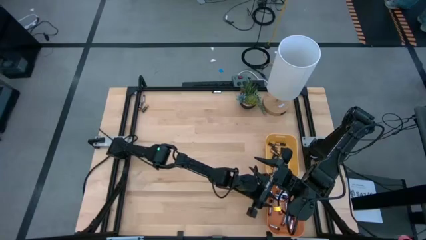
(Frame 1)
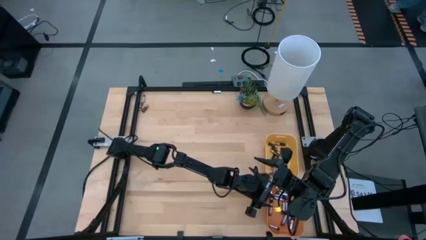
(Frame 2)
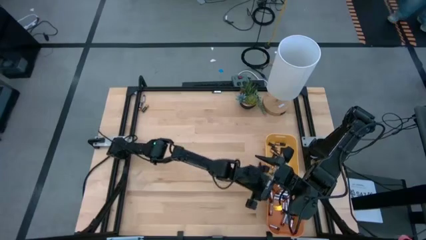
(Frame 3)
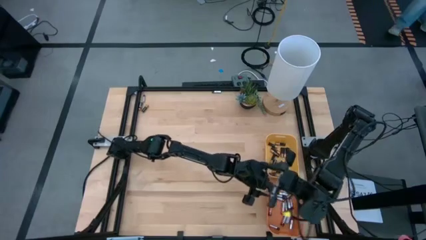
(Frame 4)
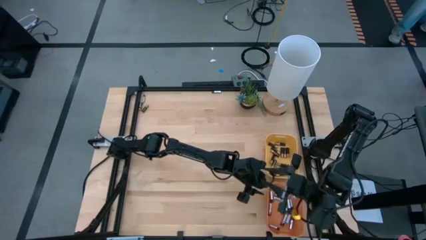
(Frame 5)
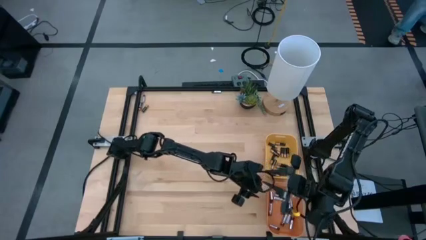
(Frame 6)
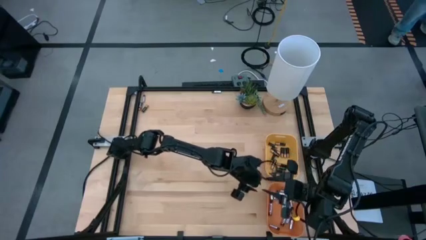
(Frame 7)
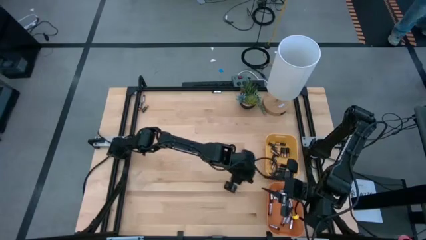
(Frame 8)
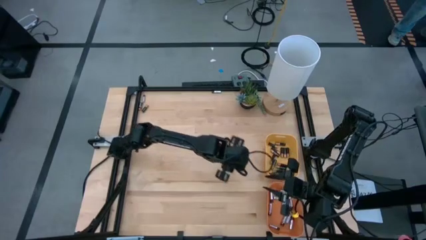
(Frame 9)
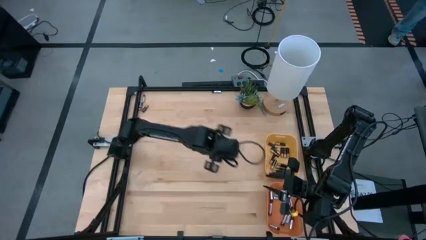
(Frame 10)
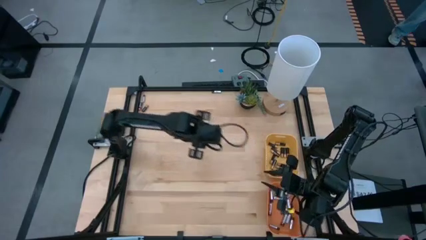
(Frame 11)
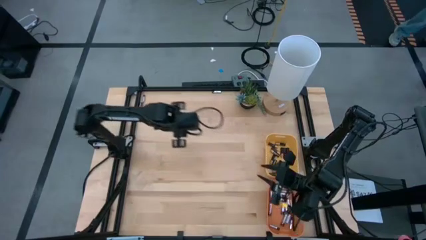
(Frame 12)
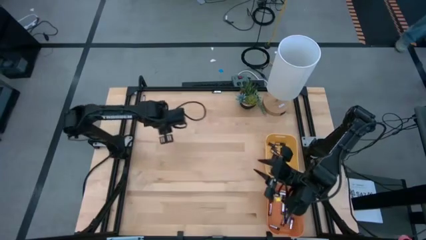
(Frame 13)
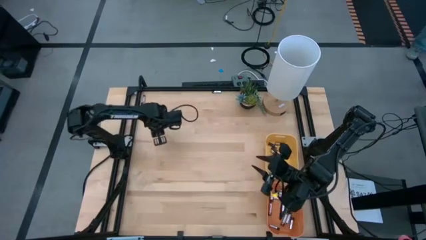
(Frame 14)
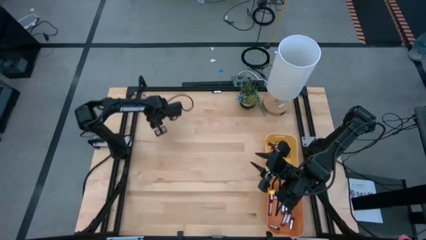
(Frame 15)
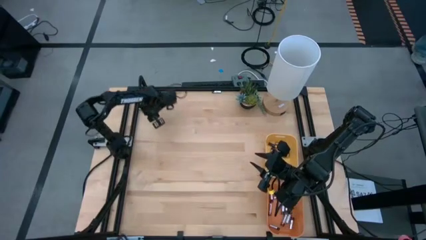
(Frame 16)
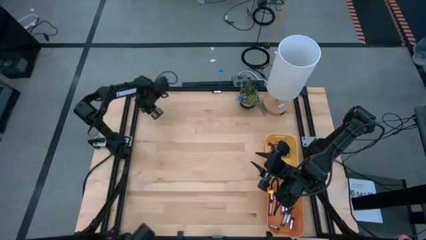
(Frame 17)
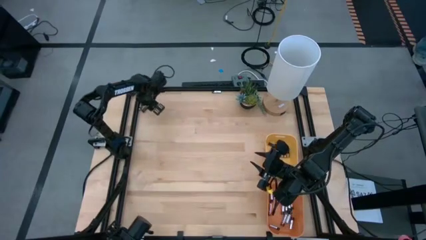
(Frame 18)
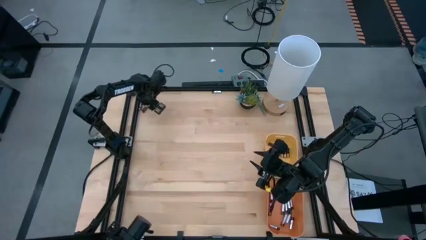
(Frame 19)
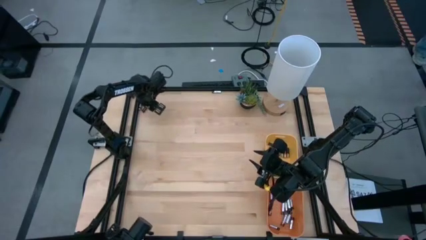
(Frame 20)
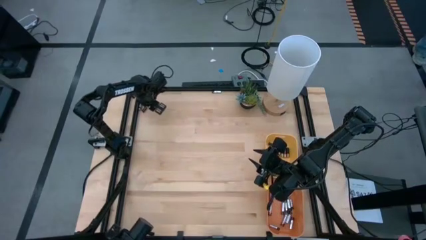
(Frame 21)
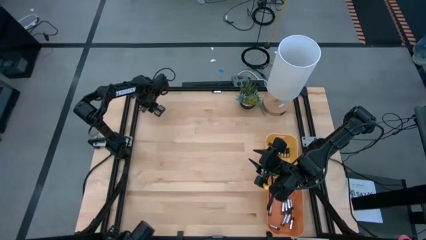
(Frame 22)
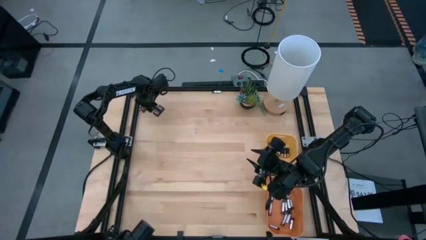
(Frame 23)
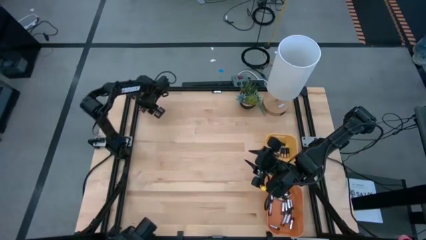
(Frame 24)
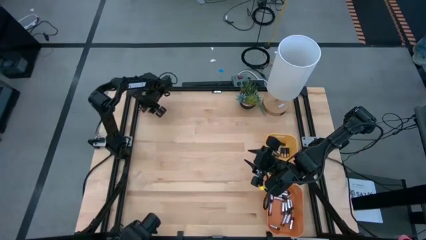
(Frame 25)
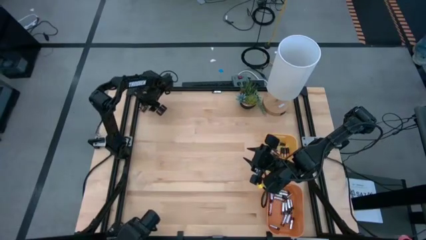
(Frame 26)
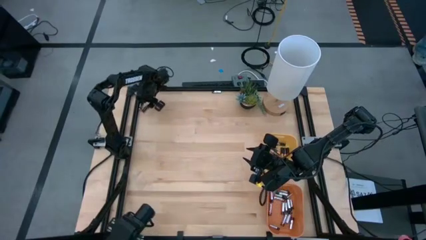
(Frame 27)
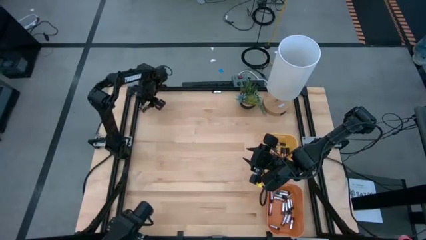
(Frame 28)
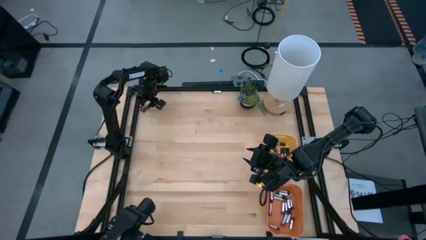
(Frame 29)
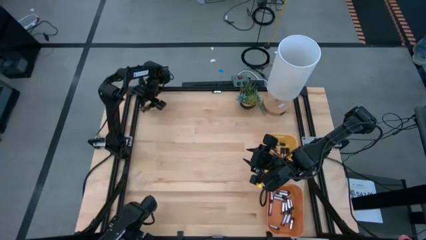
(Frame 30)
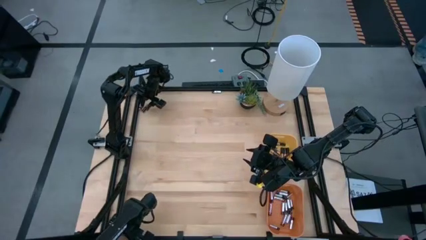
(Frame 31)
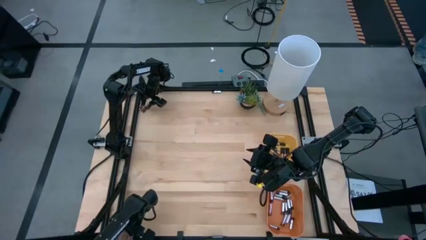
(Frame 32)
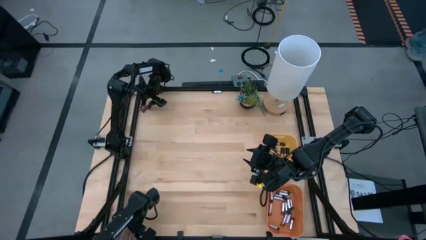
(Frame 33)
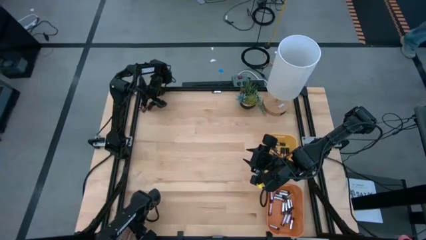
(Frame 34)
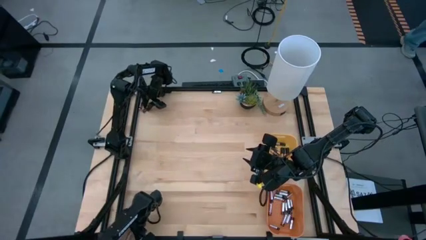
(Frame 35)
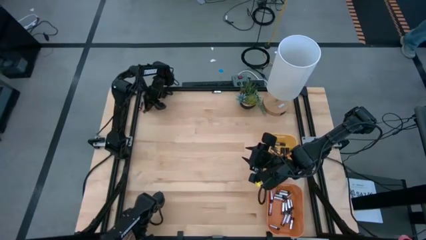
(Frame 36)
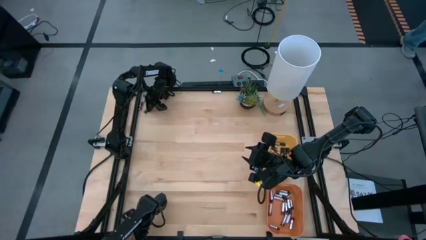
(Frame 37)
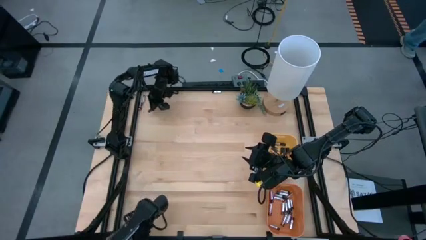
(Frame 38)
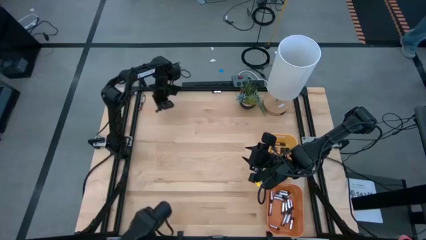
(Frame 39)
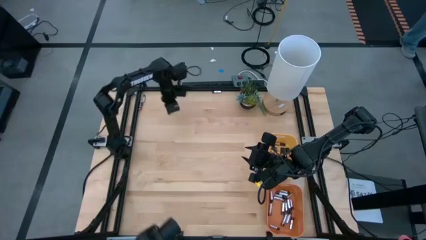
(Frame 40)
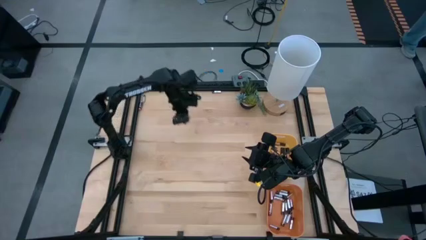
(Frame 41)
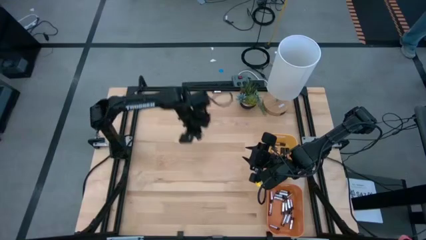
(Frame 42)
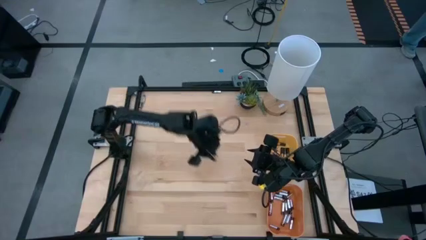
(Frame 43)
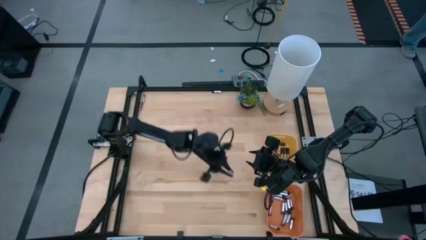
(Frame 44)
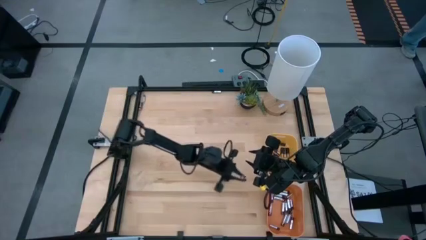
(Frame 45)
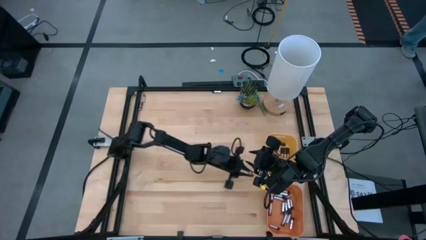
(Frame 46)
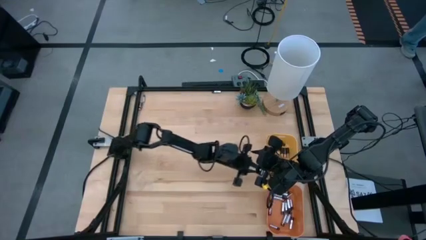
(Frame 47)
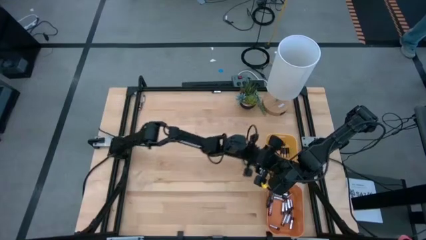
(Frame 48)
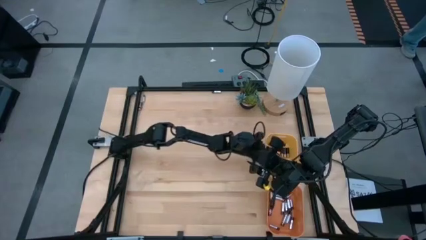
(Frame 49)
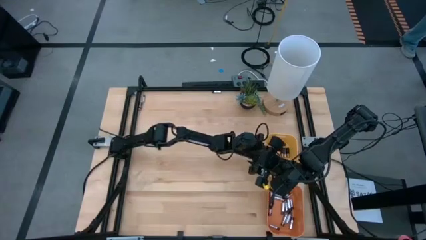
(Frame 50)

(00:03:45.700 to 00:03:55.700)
Task: Sort batteries
Put the brown battery into the yellow bin
